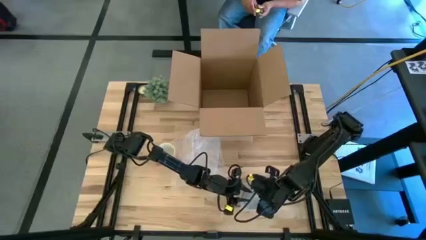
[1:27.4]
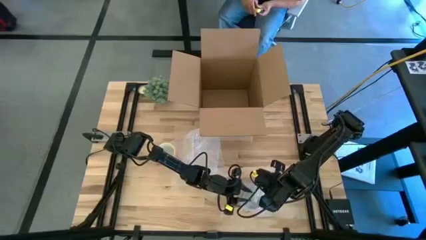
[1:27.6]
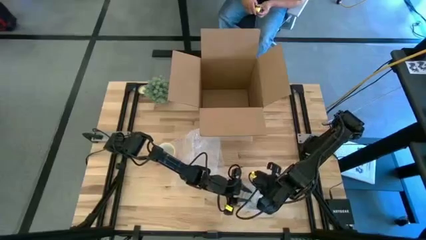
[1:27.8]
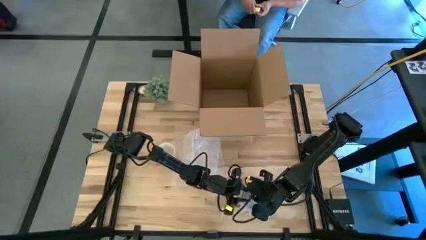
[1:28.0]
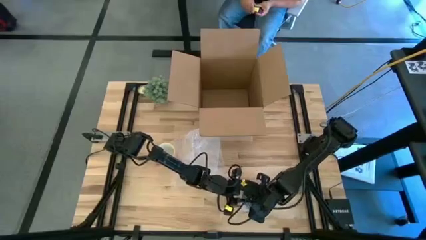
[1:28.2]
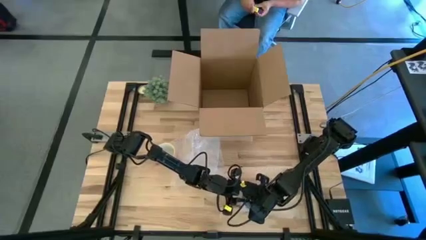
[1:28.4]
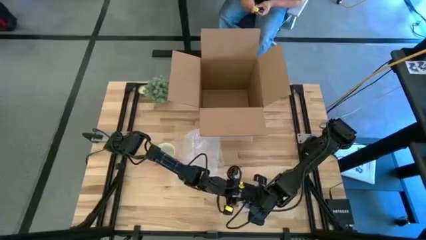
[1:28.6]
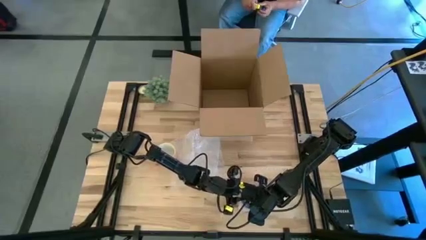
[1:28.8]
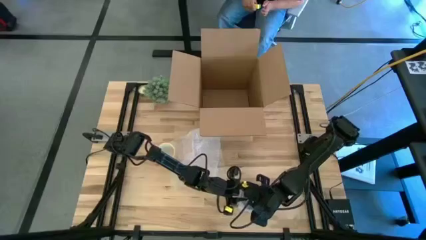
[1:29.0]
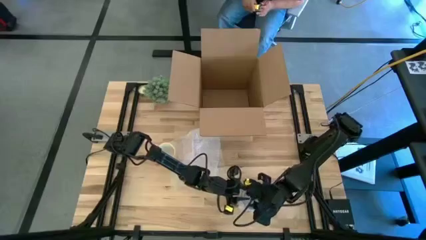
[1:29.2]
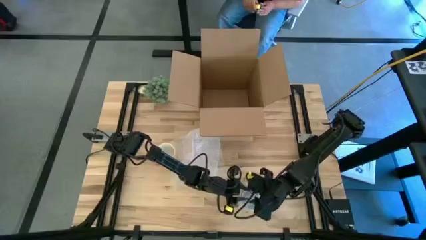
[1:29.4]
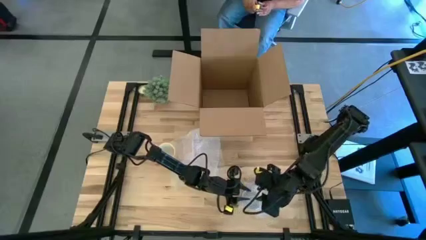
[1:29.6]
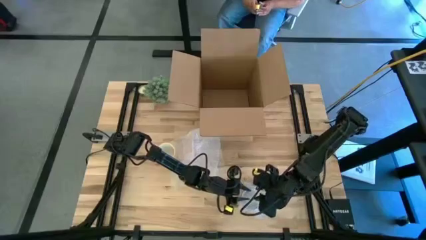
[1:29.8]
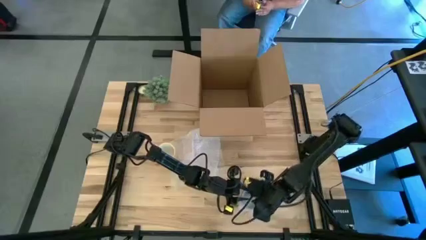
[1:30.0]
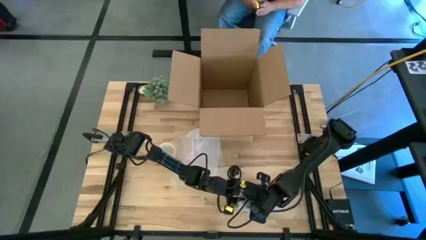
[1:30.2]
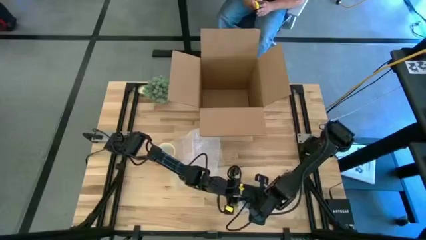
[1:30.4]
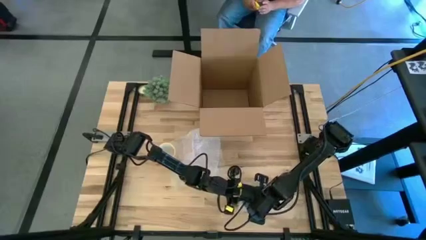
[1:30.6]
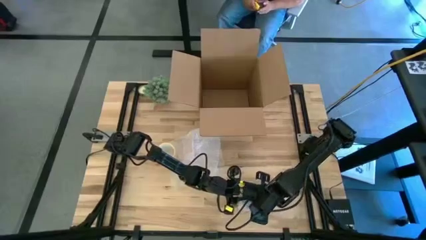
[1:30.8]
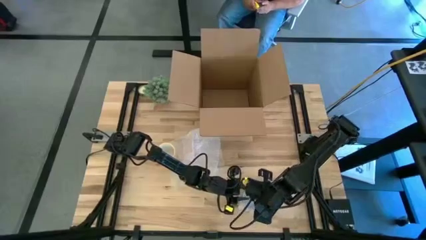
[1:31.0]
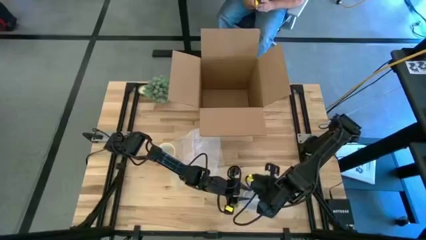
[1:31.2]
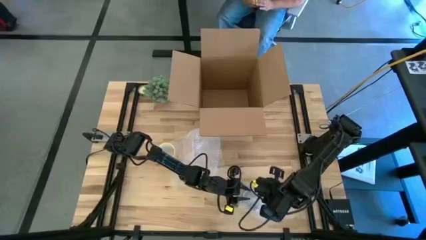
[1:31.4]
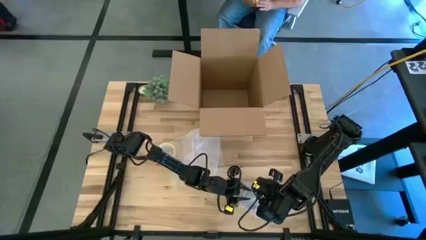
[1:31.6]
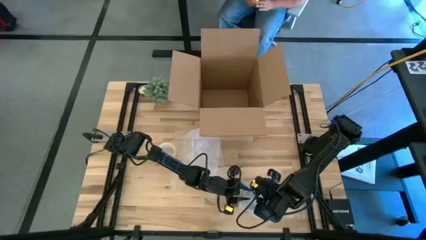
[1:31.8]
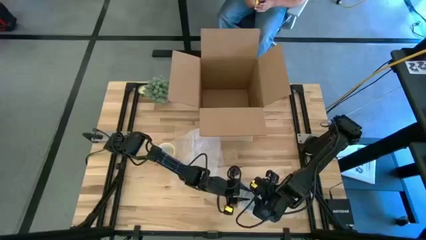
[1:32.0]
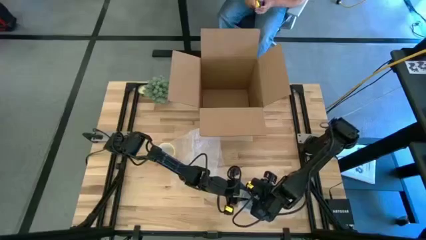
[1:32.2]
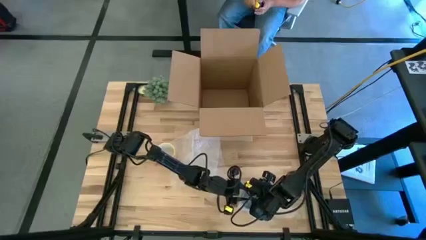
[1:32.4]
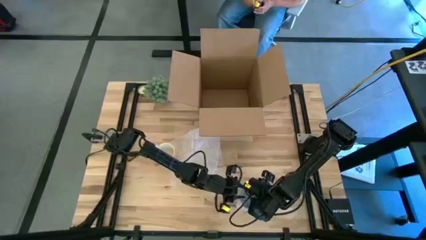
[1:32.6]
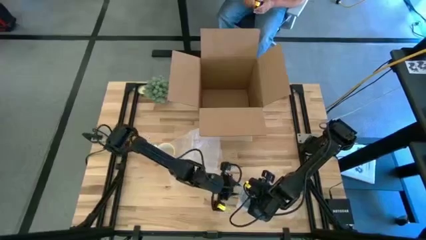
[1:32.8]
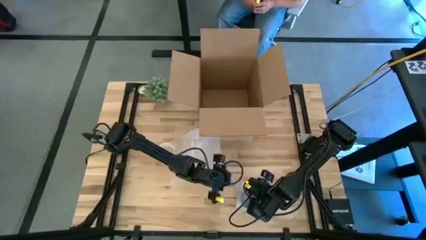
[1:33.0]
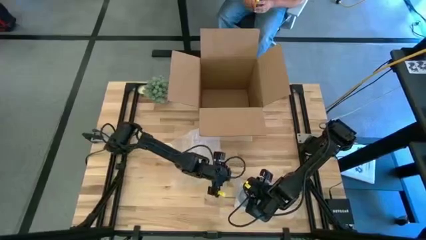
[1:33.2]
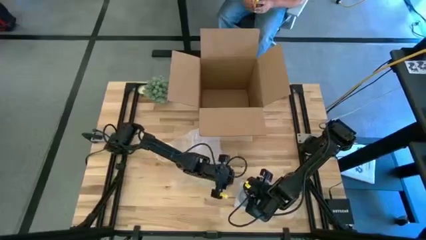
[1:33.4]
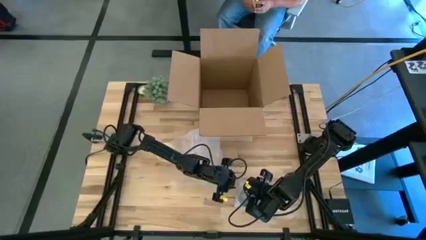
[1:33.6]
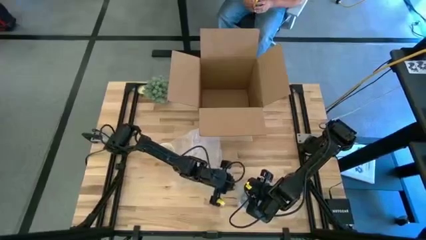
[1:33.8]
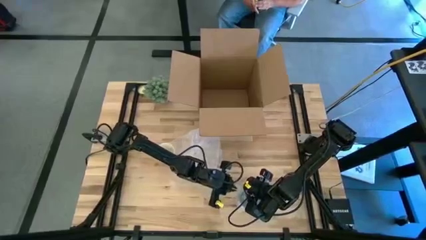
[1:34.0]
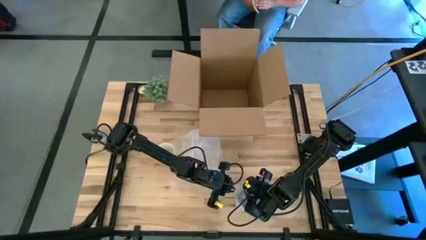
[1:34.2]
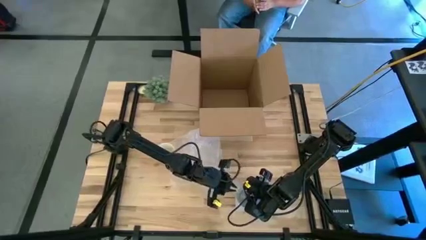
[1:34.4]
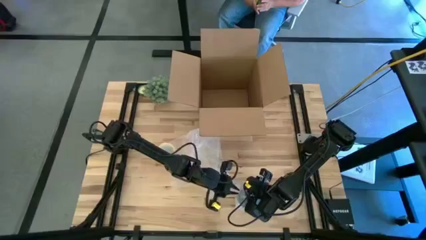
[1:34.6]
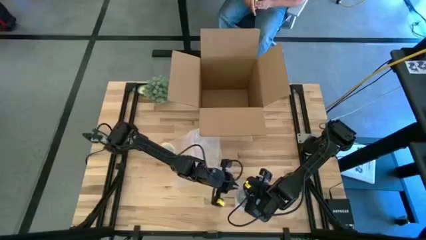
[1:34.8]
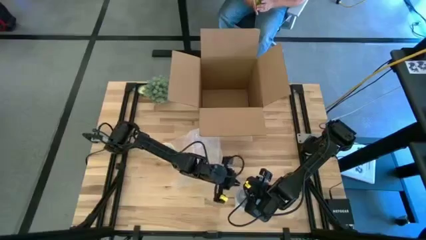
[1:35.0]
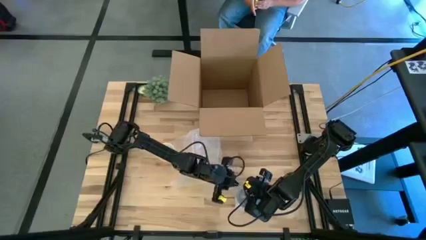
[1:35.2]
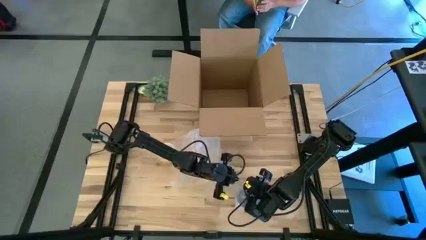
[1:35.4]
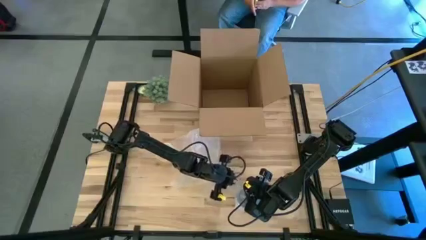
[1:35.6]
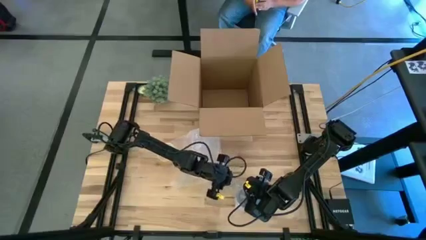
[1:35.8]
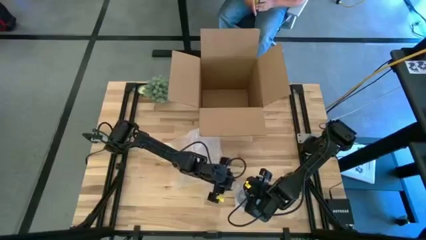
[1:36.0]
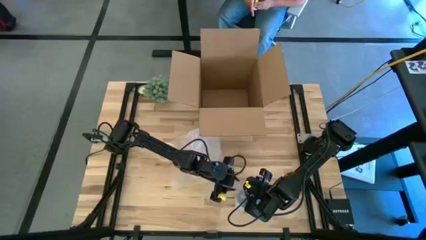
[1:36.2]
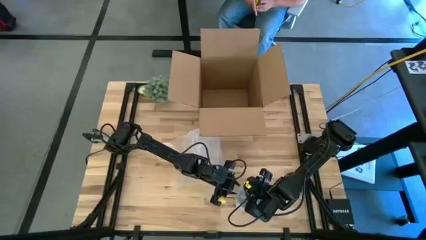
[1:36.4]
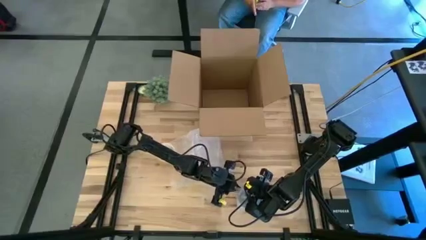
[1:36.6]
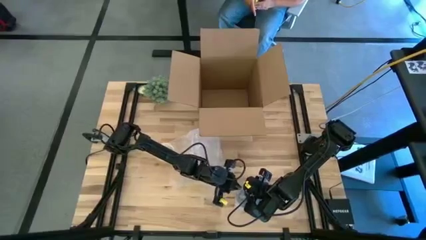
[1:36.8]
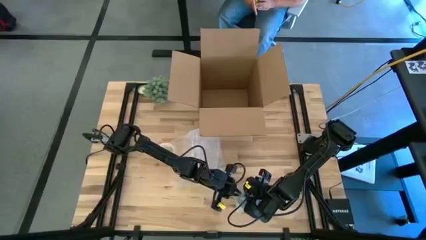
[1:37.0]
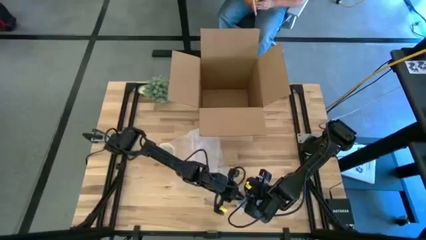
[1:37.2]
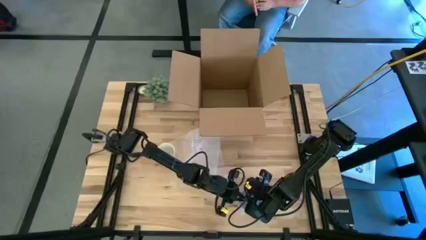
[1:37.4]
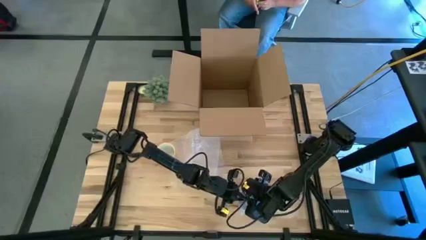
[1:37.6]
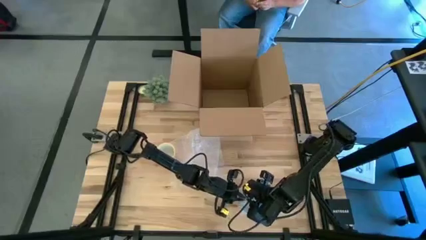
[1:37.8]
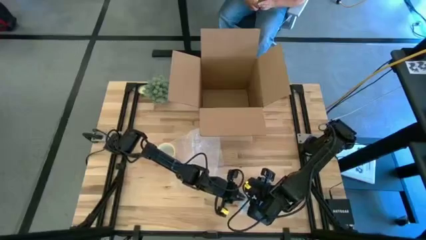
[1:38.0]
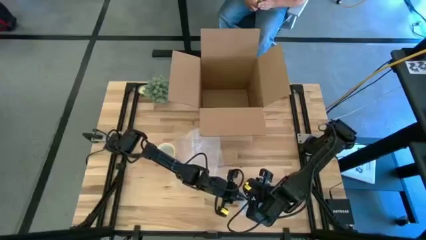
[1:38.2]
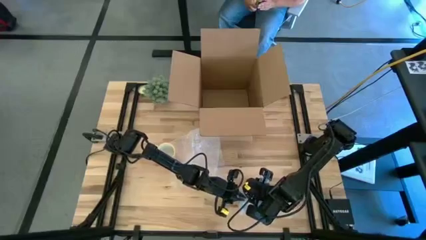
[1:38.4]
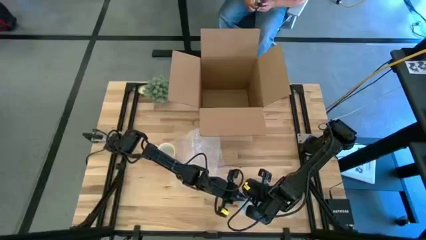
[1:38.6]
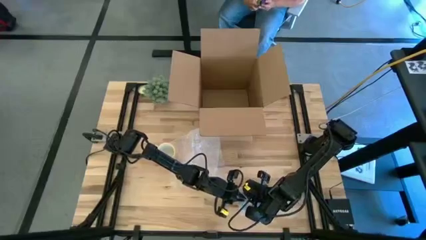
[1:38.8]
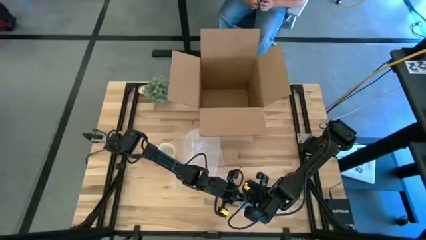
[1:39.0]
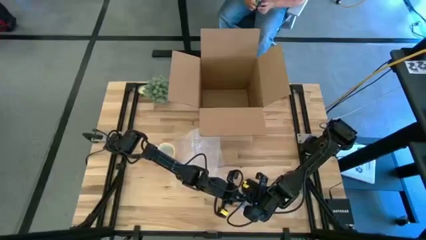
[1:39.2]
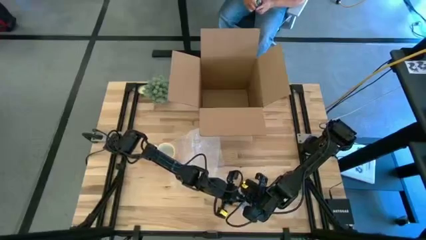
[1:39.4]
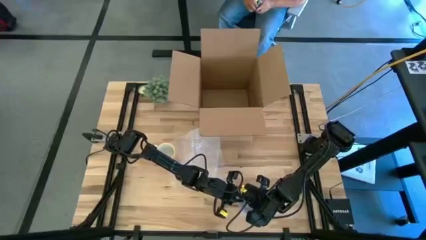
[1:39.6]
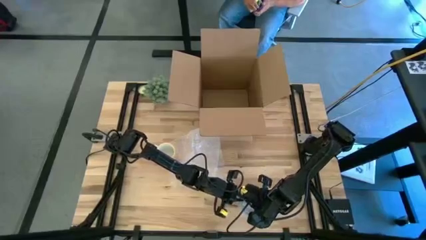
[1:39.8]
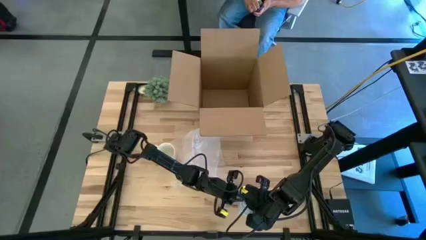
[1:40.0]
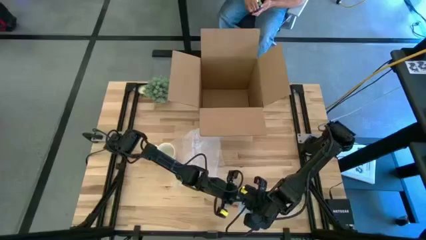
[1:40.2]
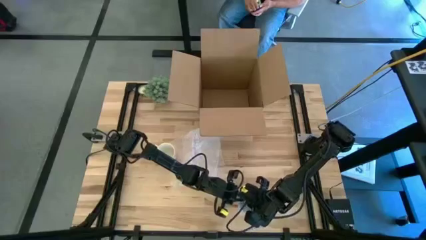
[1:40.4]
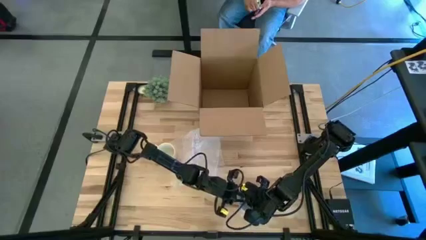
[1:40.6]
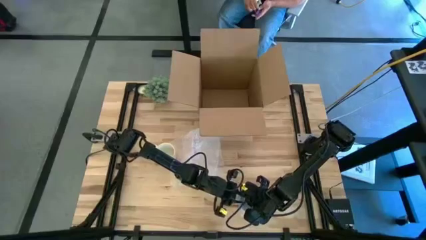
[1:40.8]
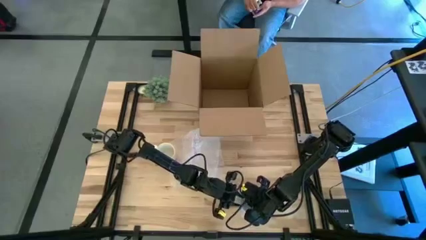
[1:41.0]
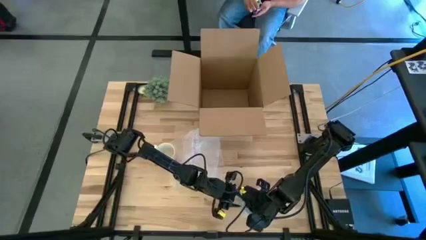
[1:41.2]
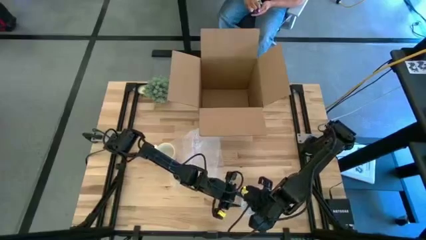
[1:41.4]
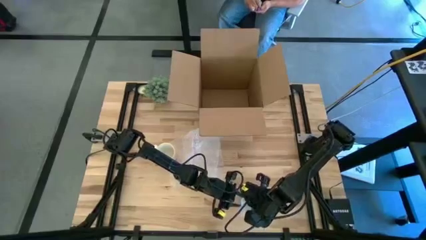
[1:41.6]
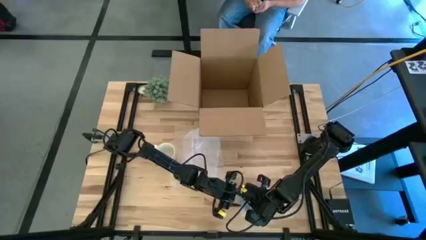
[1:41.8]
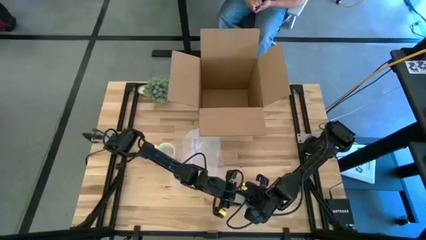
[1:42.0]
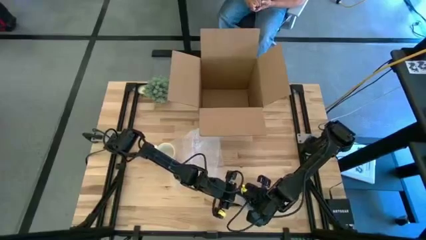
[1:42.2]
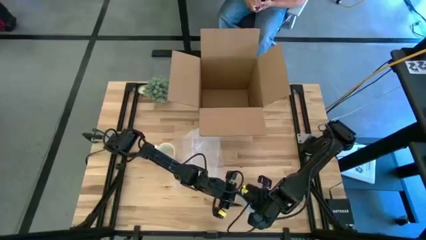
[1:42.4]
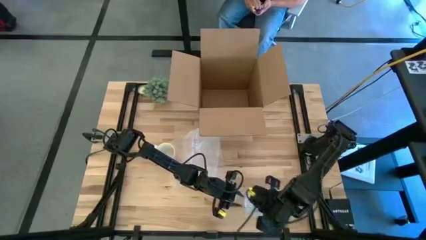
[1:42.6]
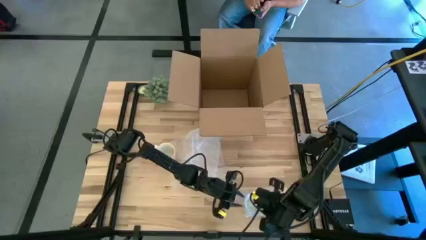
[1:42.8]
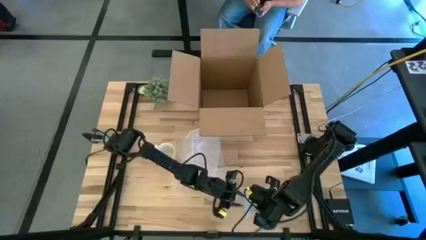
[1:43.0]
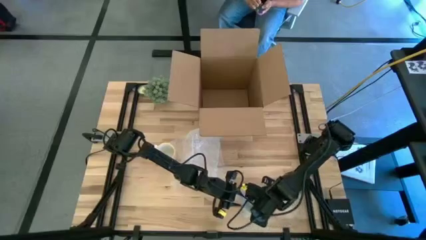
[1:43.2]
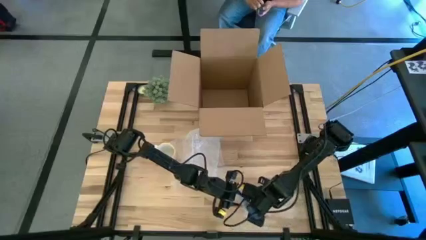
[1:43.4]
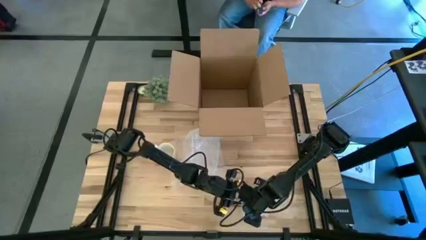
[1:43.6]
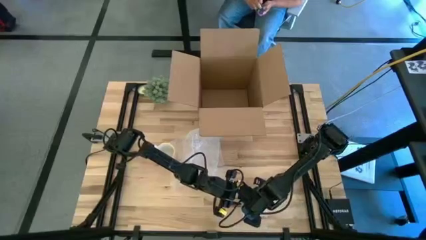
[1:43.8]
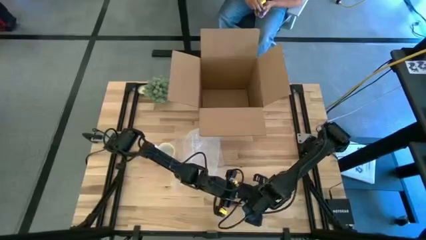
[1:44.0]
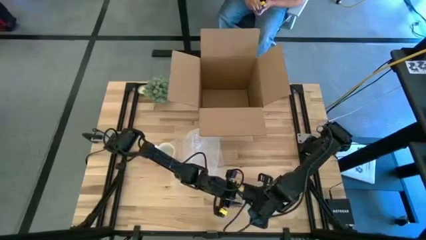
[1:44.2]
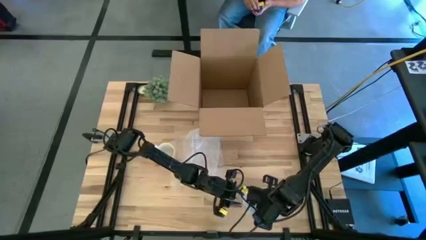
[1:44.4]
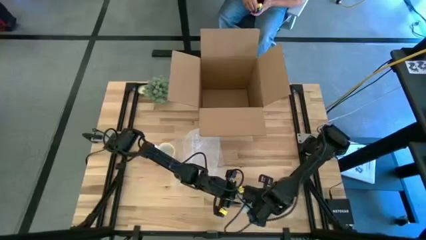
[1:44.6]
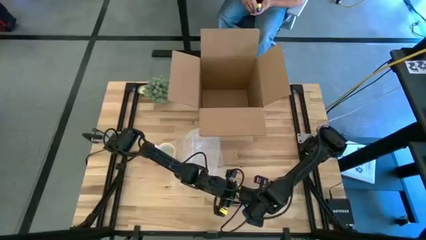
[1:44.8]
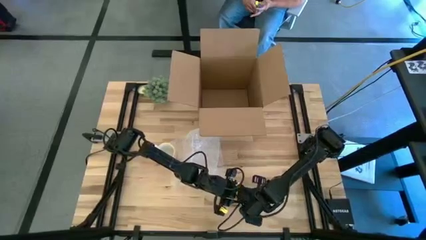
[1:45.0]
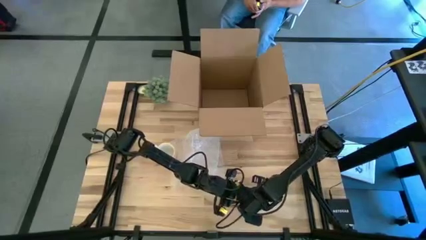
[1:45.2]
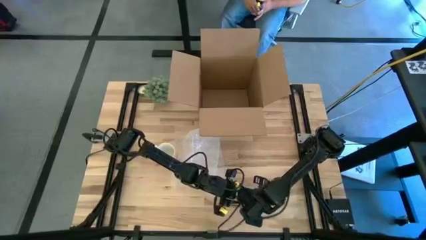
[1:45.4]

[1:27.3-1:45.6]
Task: wrap mug
Wrap the red mug with the right bubble wrap
